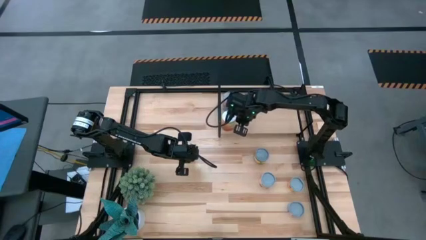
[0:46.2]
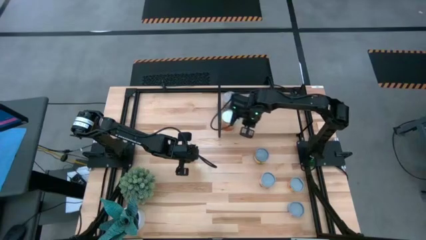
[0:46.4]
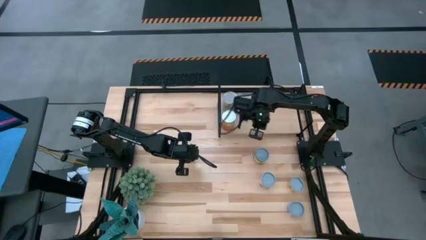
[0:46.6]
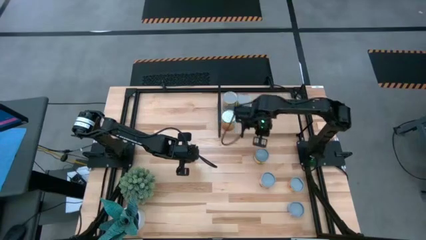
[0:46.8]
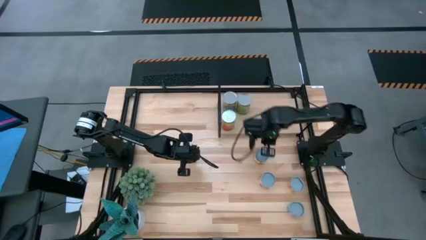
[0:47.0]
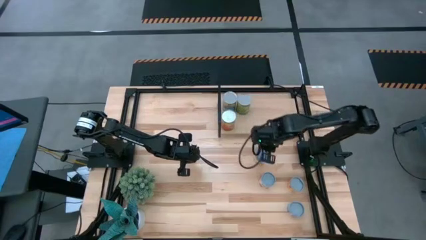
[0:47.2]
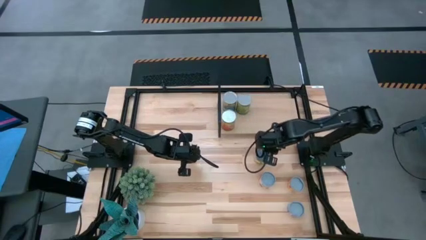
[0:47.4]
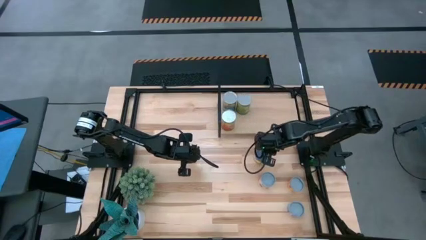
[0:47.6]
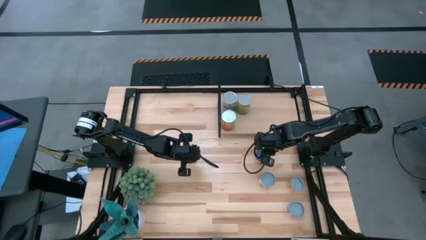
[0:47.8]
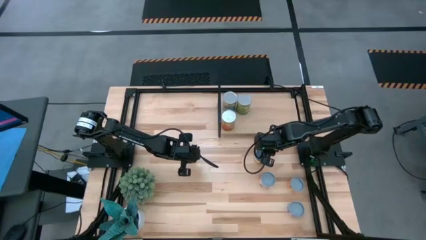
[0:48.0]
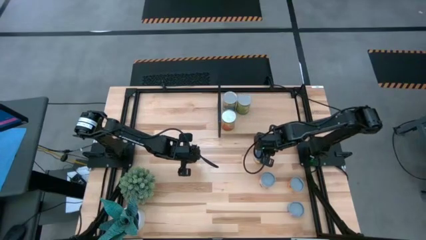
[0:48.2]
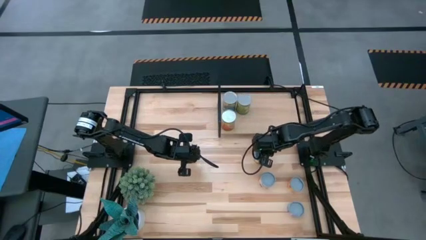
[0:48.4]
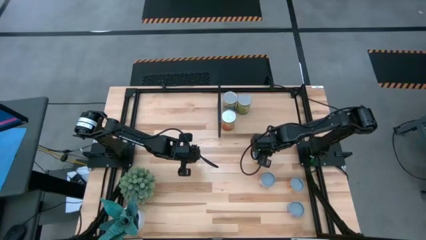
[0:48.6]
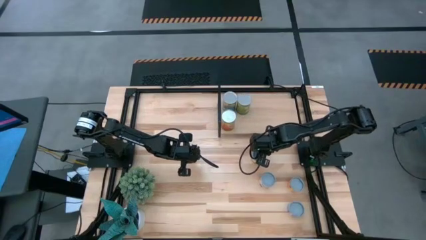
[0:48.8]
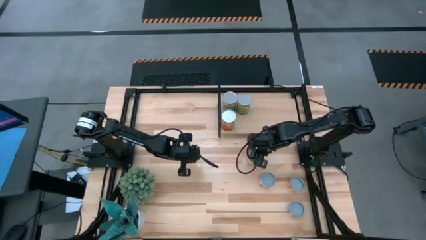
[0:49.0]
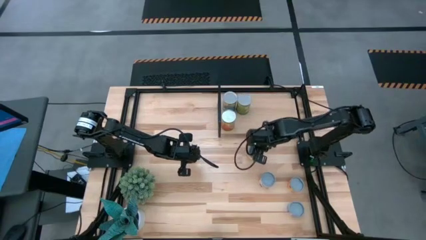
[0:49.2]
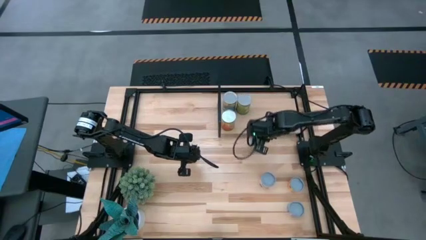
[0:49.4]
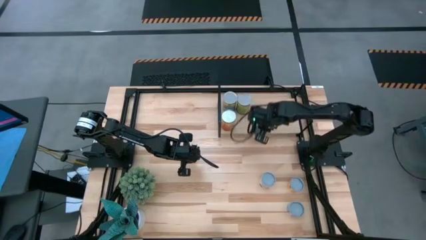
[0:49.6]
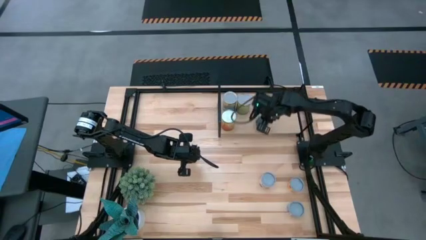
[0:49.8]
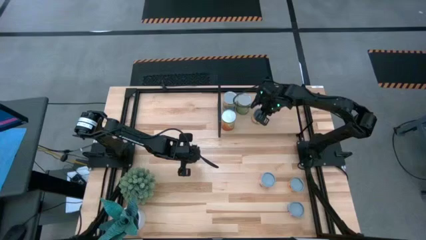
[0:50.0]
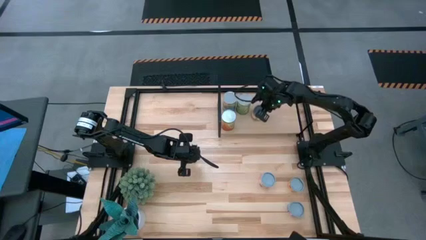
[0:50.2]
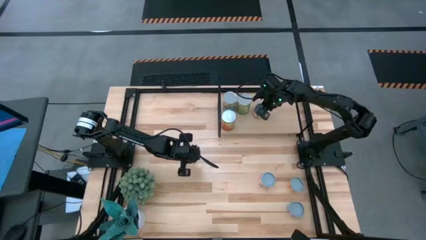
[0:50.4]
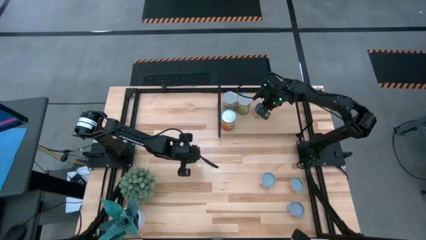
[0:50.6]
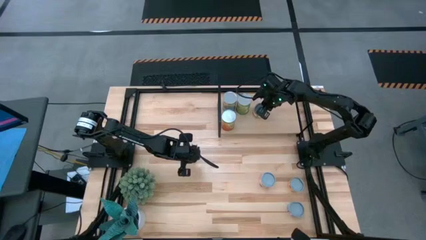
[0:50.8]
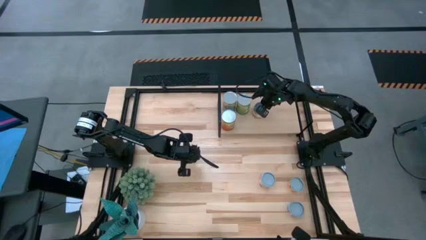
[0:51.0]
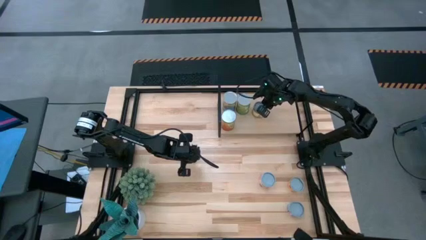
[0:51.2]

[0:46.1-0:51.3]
Task: Pick and place cans onto a shelf
Put the canned sliced peaches on the shelf

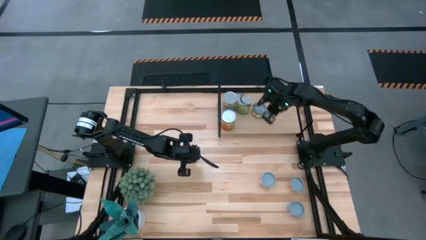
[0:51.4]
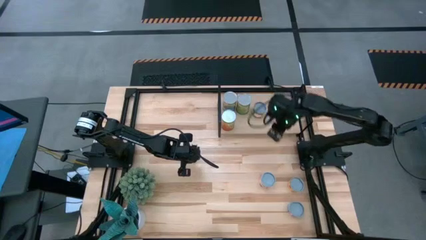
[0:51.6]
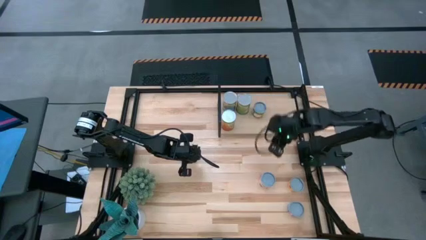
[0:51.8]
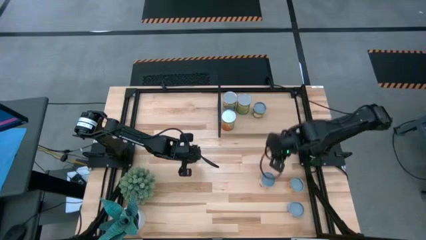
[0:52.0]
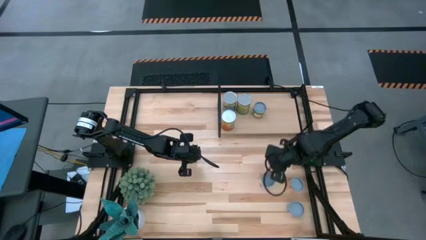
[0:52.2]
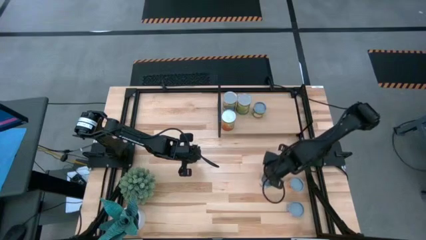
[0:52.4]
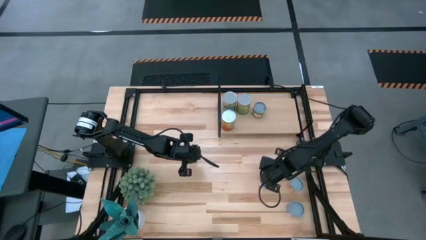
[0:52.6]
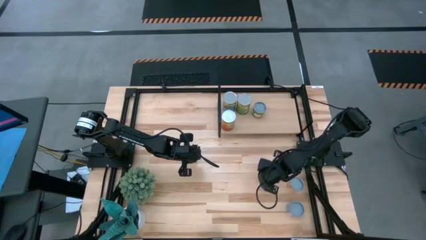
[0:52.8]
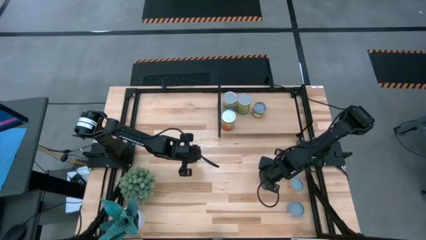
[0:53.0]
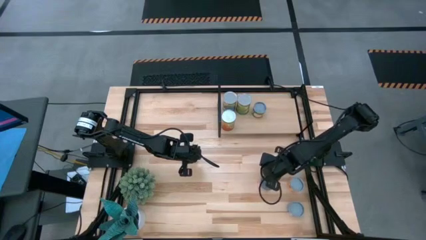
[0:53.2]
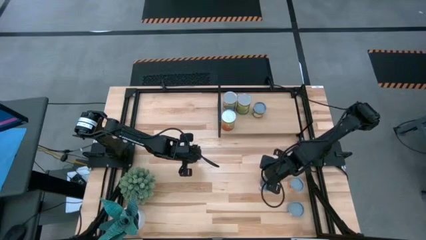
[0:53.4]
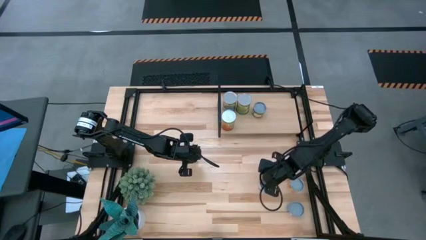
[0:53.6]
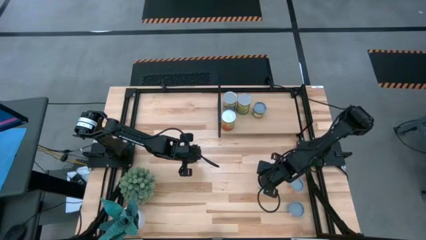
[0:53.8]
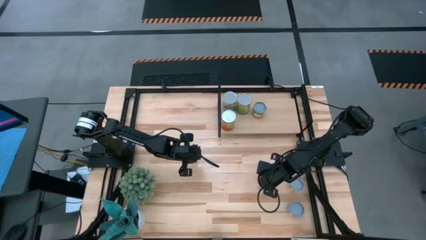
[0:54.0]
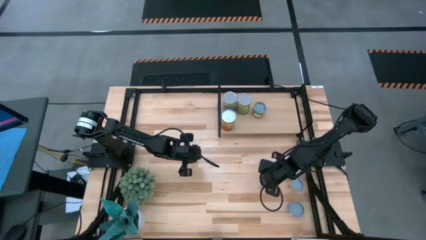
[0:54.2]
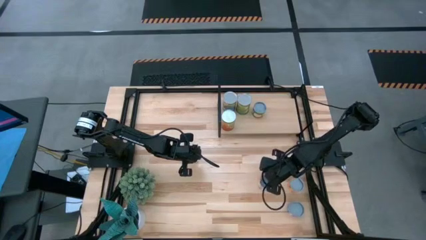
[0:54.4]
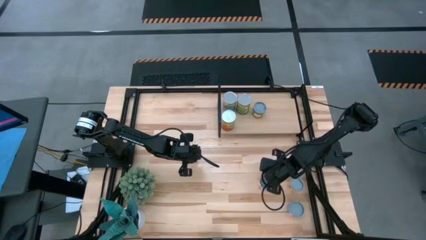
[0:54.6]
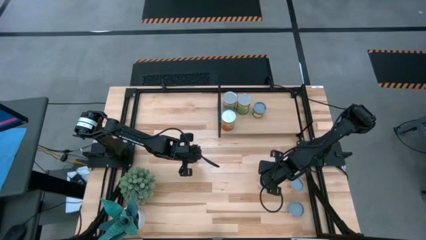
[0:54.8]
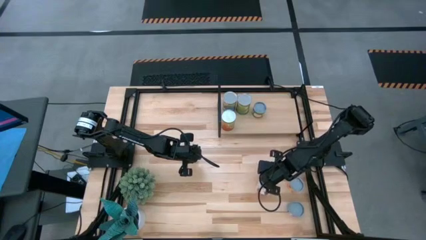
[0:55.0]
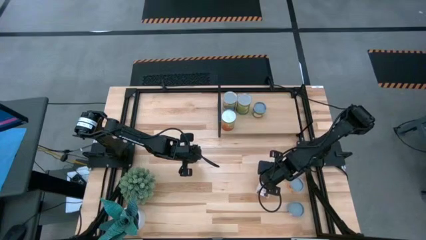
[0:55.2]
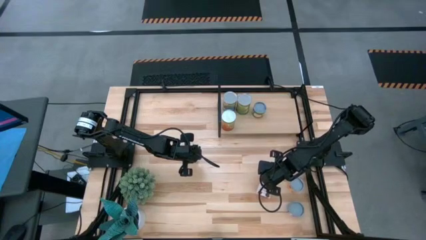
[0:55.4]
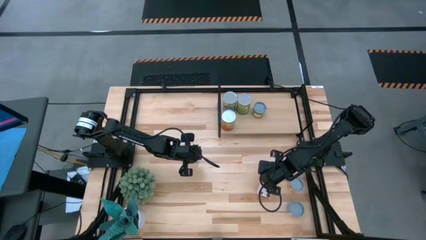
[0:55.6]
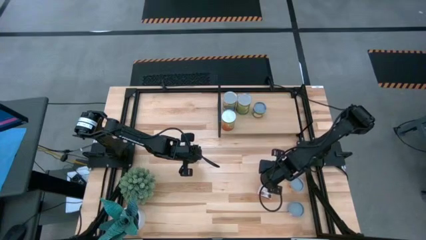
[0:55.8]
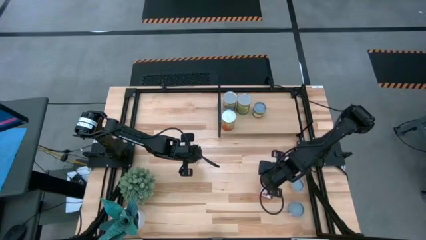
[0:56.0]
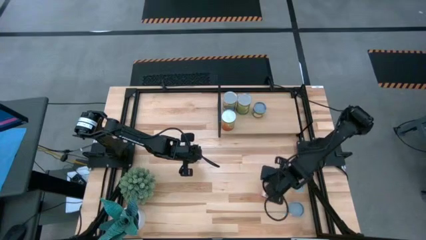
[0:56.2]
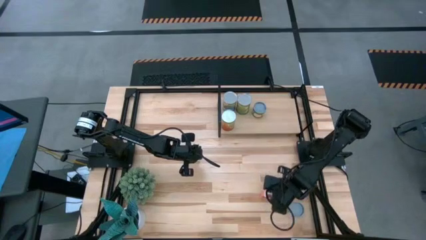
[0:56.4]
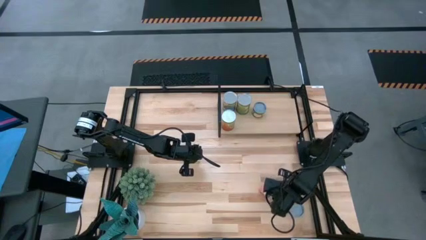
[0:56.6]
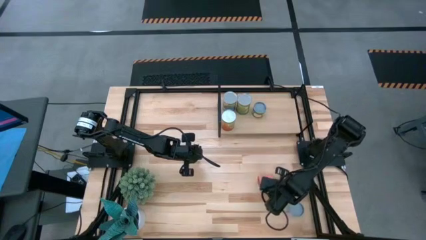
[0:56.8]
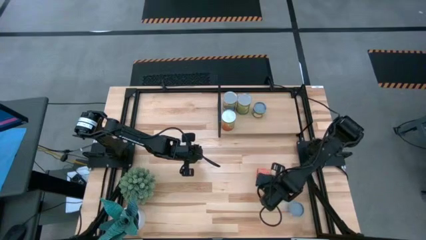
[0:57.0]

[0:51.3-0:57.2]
Put the canned saucy meatballs on the shelf

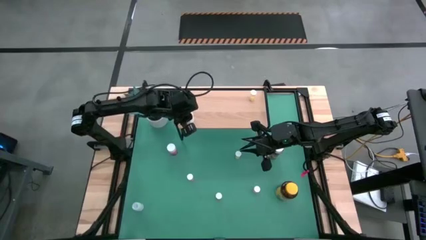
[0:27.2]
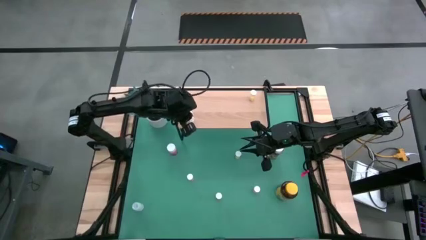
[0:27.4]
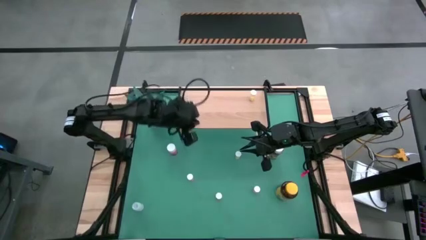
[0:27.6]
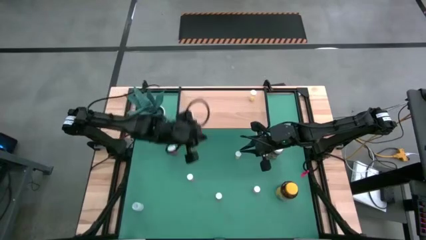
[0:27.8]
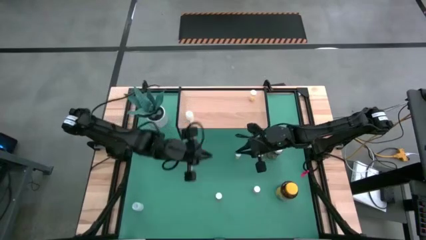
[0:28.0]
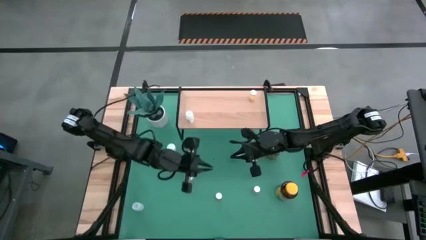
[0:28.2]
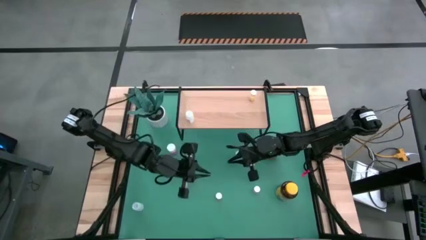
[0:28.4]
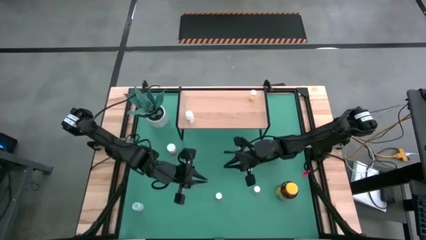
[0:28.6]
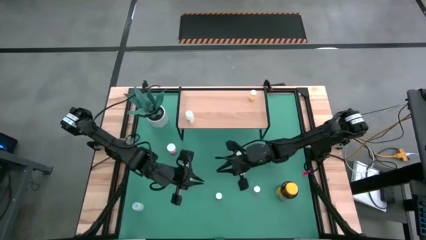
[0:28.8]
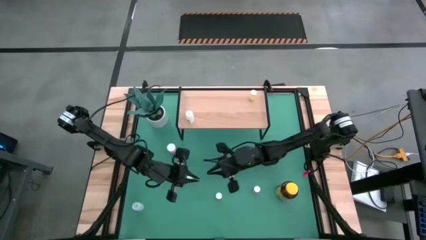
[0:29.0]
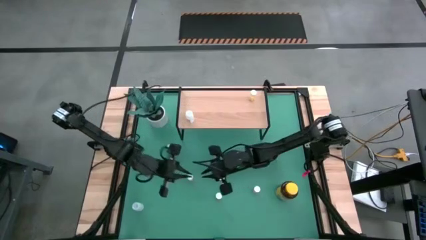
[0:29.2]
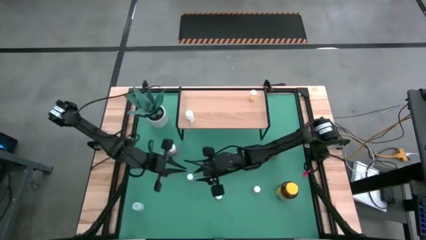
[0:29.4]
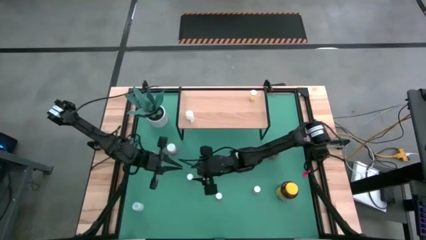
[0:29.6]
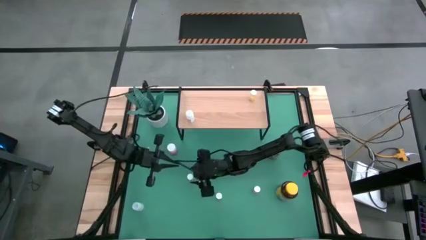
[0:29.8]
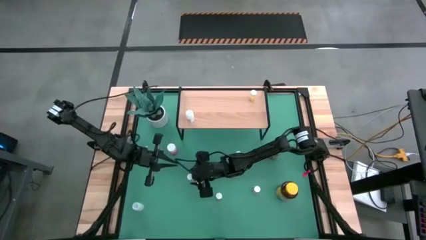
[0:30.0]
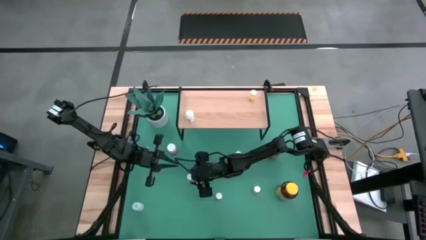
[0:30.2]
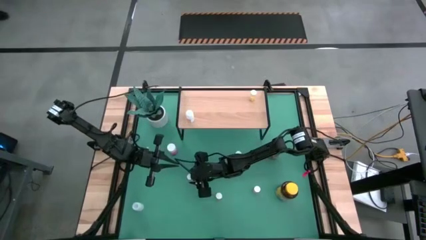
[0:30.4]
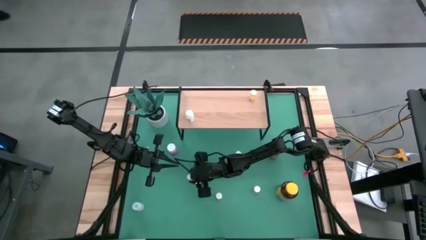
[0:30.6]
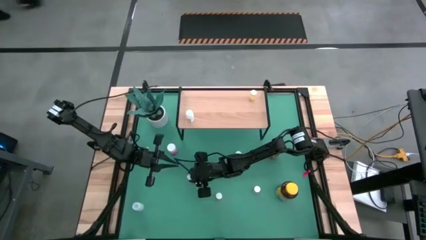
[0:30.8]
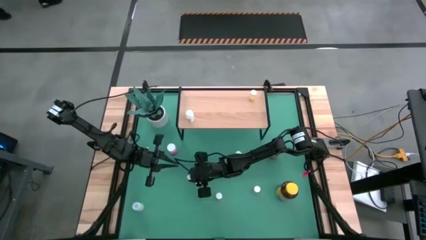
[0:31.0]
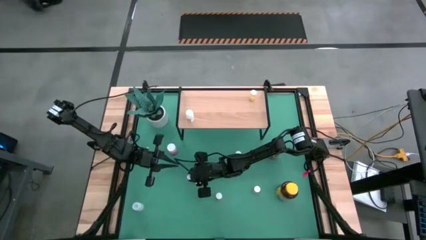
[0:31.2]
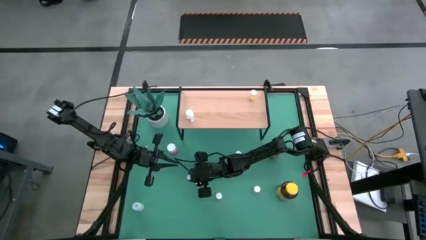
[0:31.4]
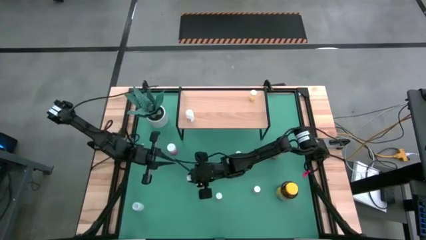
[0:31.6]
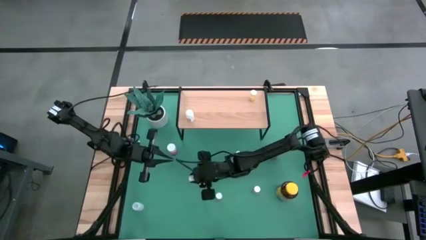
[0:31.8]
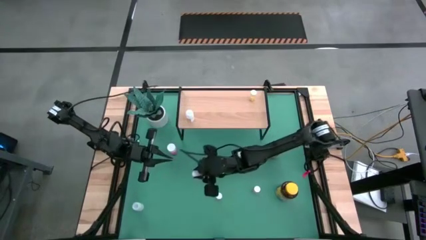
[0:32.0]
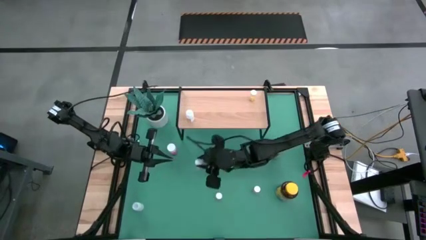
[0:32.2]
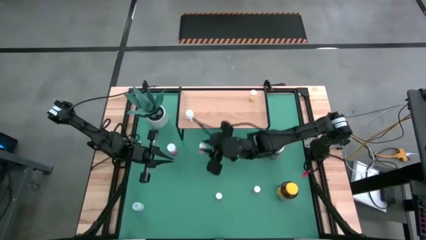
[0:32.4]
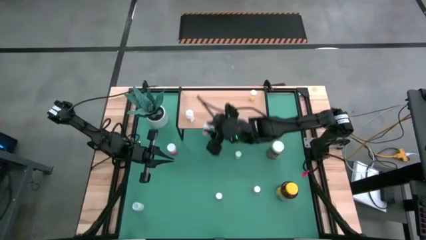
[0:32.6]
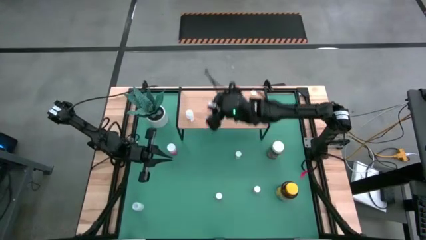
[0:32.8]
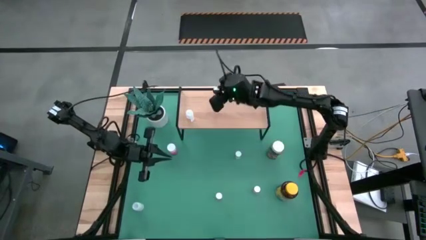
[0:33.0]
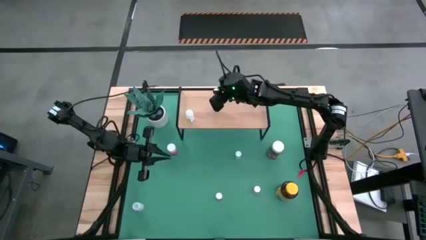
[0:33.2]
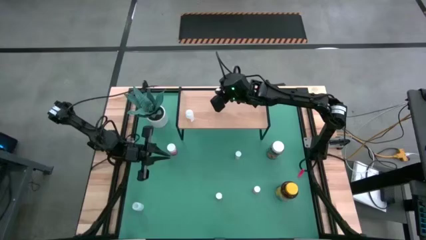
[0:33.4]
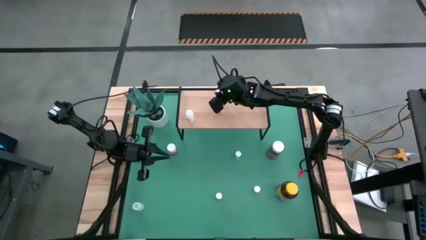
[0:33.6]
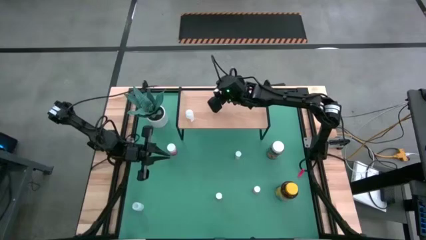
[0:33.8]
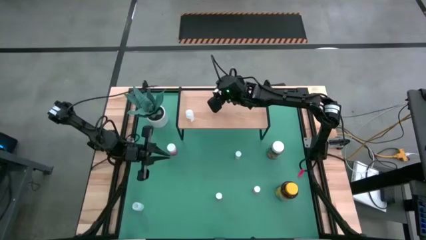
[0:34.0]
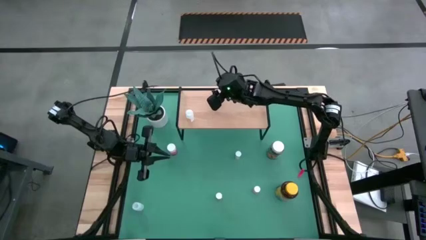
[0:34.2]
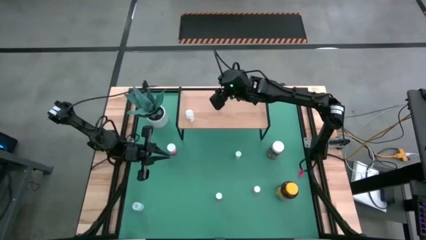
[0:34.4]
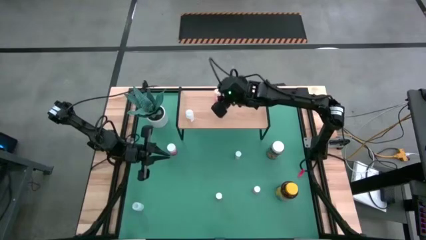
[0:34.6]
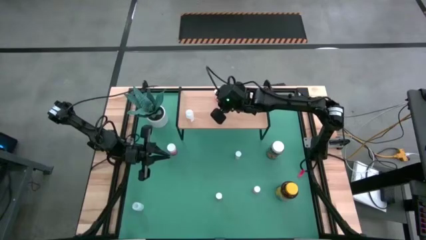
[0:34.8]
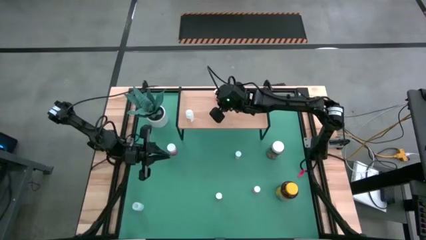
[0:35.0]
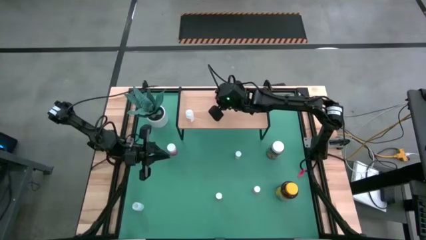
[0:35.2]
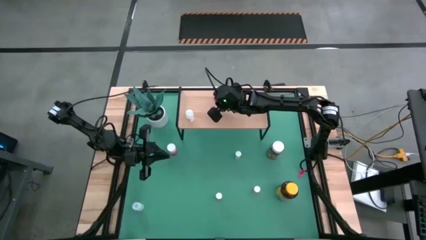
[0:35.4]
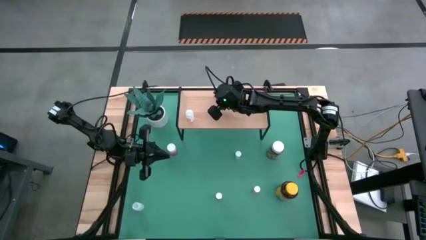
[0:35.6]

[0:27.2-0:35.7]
Task: Pick and place medicine bottles onto shelf by color
Put the left pink pill bottle on the shelf
